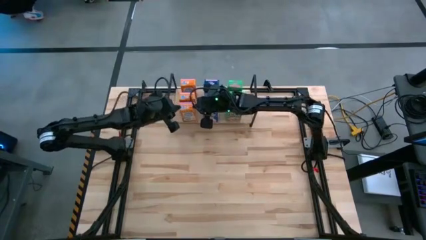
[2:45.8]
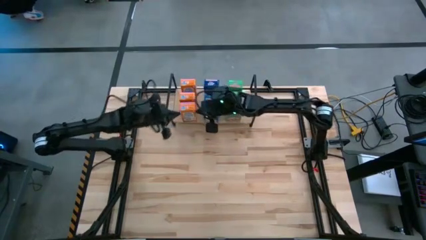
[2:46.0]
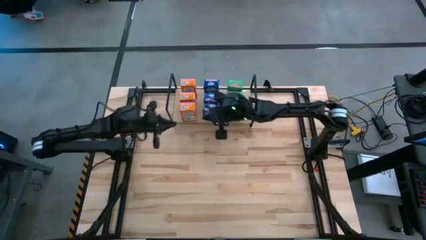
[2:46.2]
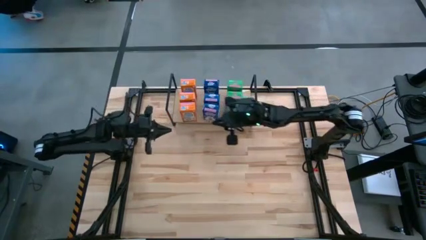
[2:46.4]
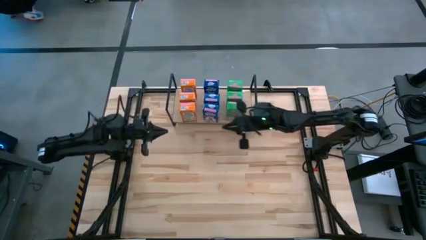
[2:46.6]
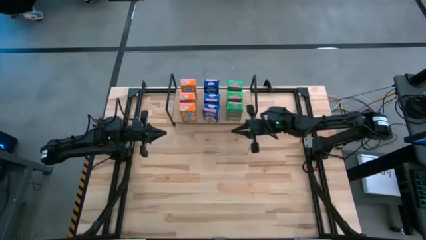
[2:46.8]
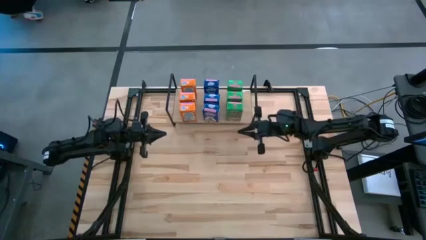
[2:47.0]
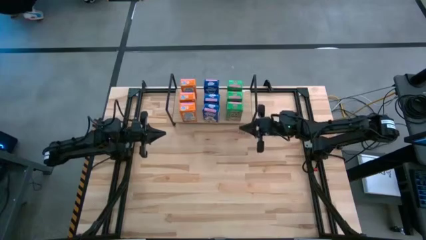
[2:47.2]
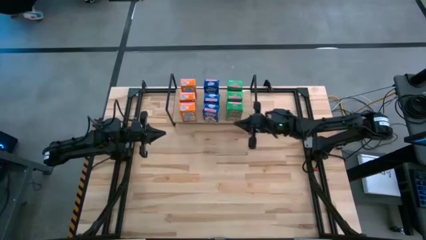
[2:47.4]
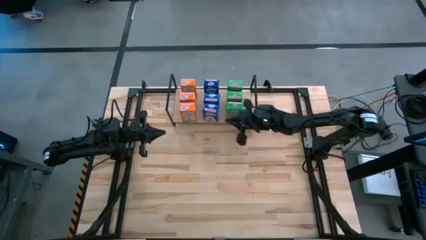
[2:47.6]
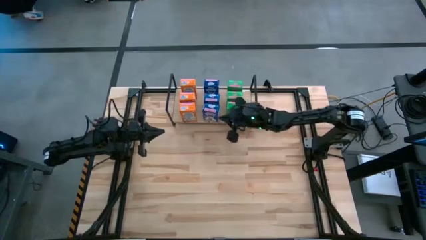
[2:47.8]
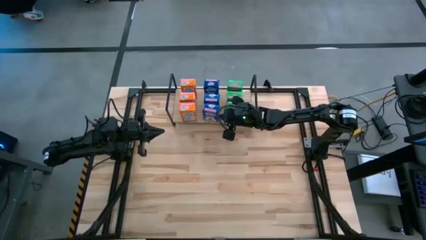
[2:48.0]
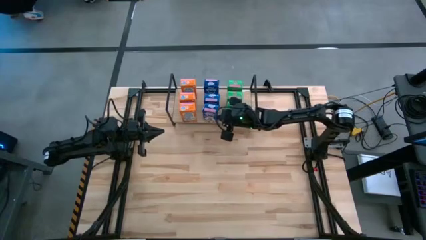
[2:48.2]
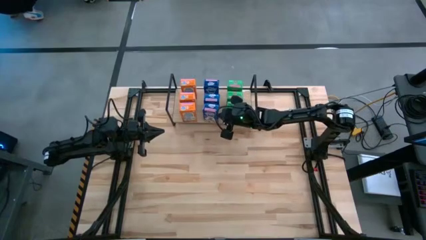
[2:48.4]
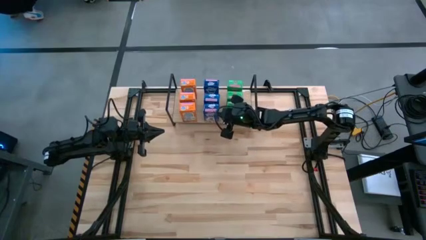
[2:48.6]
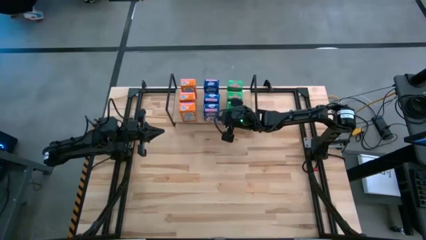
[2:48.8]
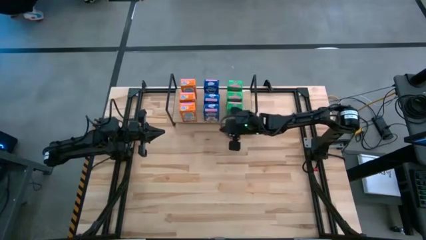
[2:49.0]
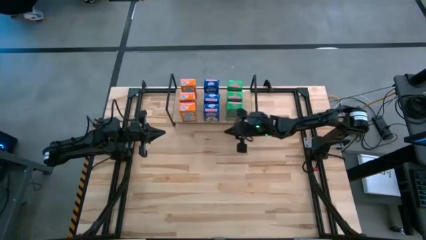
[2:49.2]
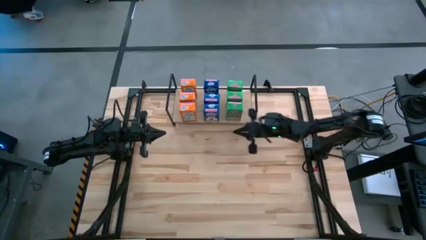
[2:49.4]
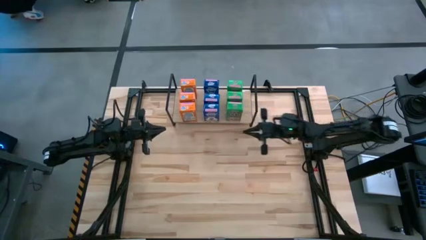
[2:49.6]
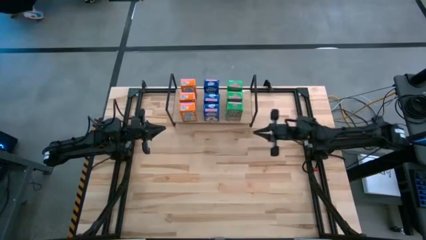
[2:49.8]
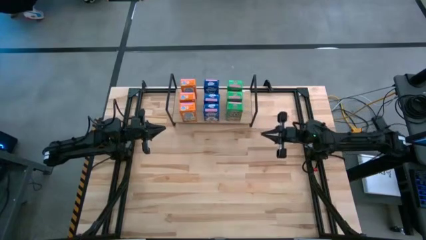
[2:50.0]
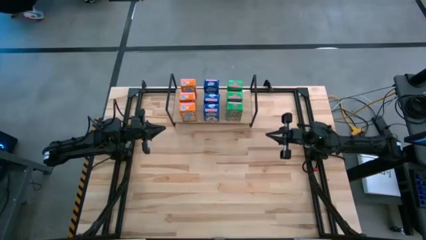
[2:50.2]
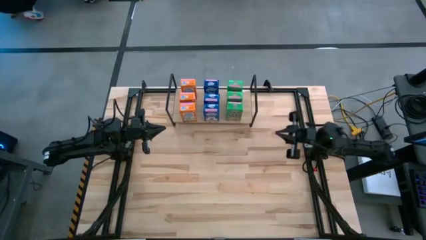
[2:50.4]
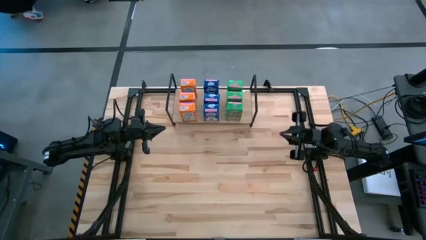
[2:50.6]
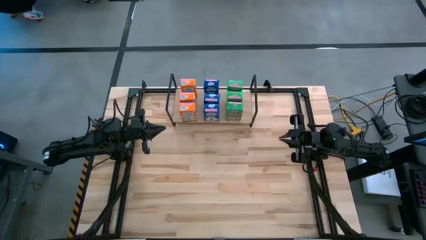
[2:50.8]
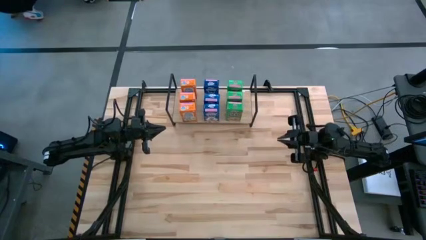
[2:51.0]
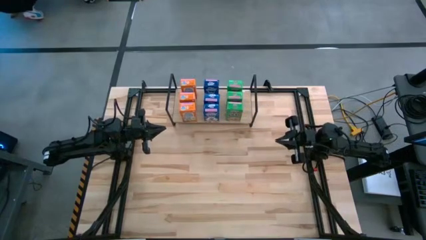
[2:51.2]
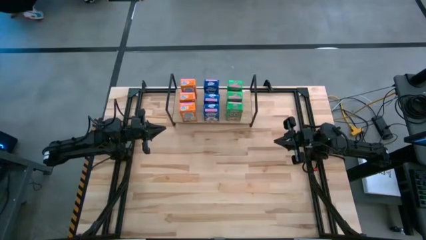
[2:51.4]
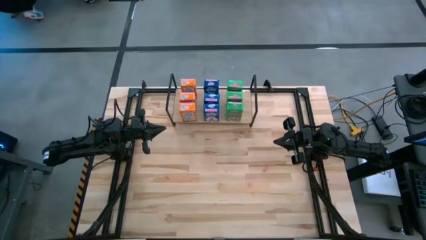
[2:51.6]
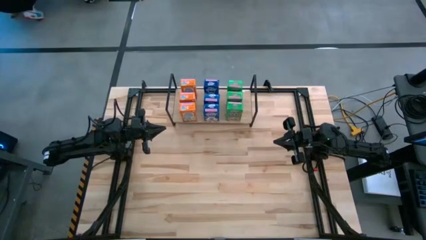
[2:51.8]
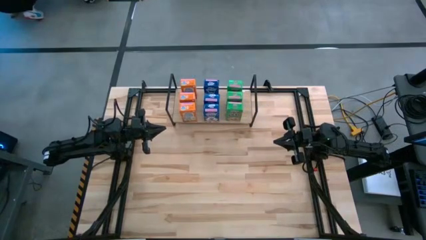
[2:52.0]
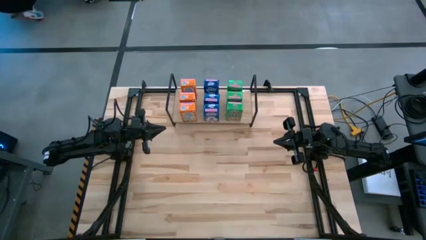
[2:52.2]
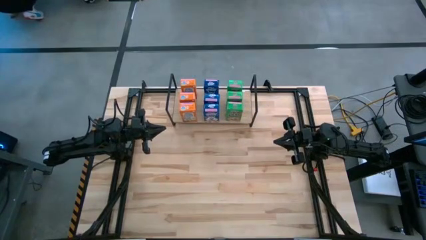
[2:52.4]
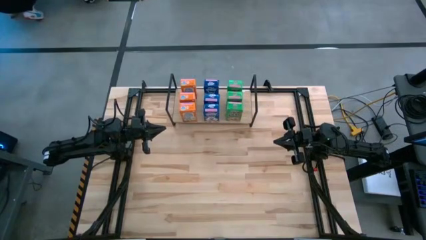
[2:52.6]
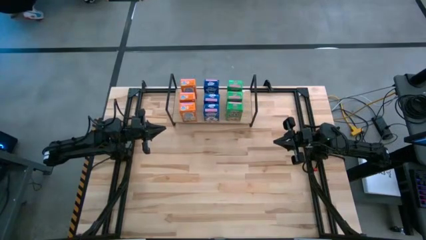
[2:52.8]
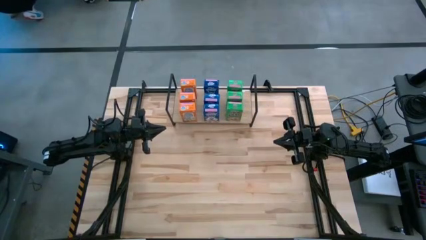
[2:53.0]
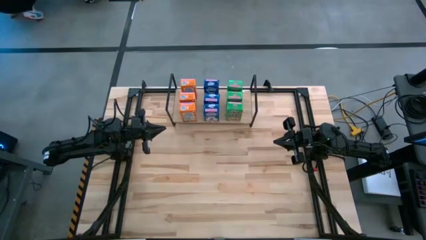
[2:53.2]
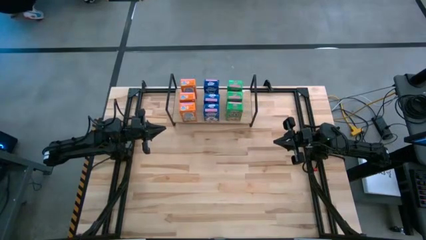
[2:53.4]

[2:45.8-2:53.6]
Task: Stack cereal on shelf
Return to Home Position

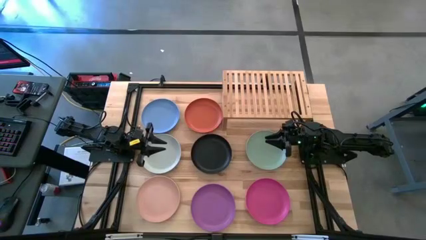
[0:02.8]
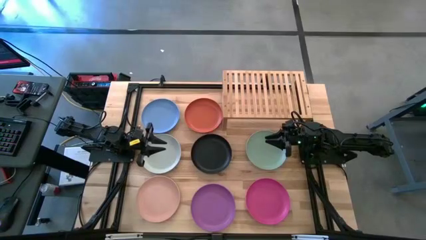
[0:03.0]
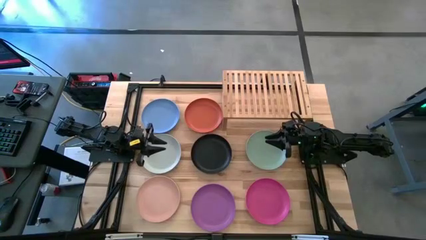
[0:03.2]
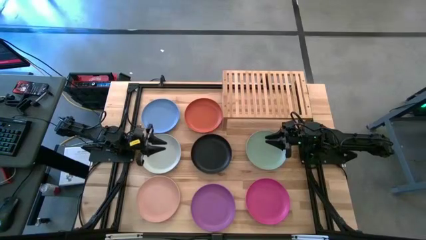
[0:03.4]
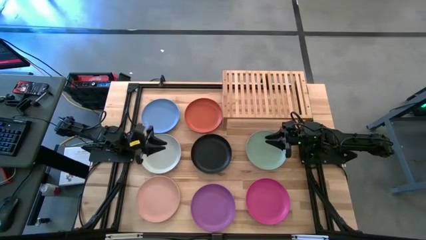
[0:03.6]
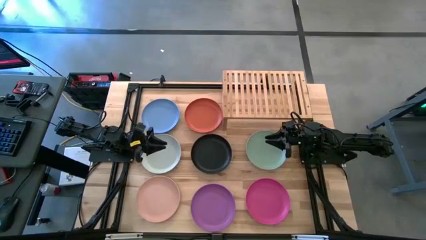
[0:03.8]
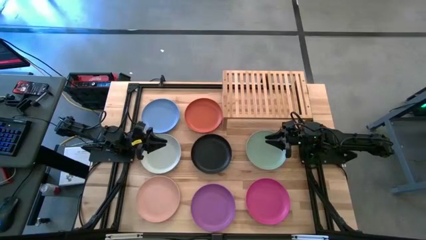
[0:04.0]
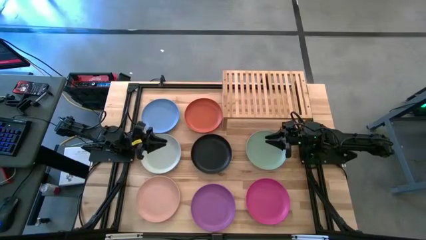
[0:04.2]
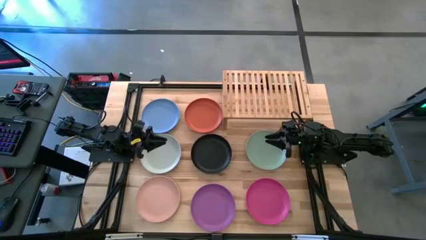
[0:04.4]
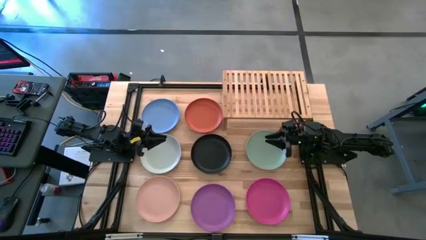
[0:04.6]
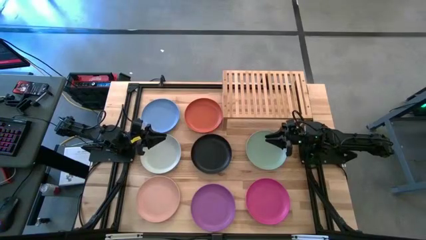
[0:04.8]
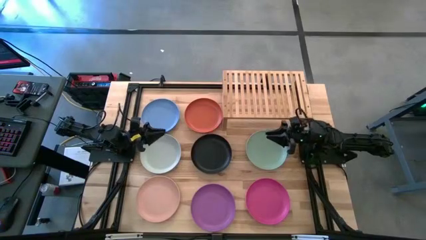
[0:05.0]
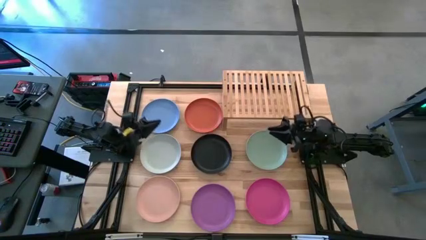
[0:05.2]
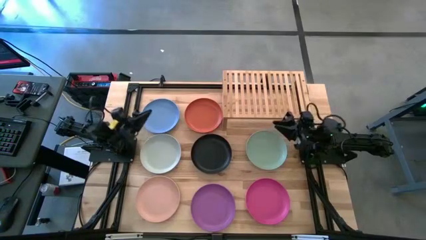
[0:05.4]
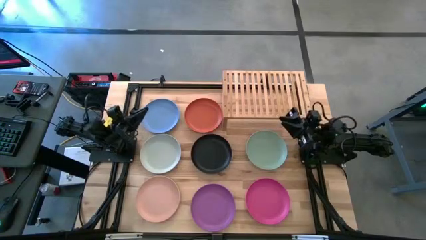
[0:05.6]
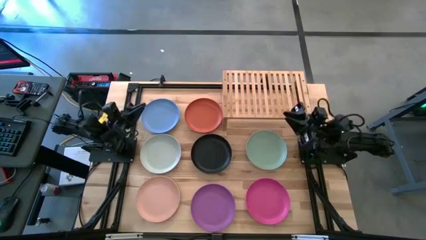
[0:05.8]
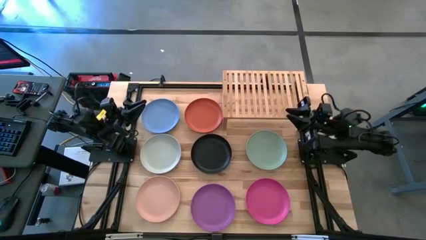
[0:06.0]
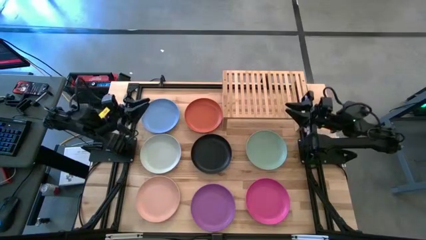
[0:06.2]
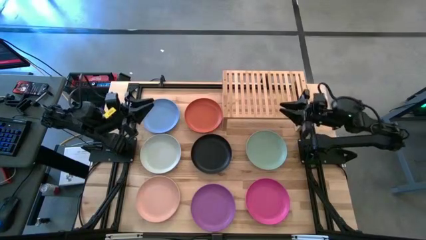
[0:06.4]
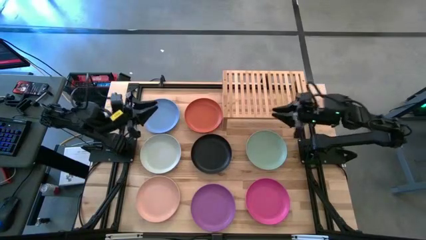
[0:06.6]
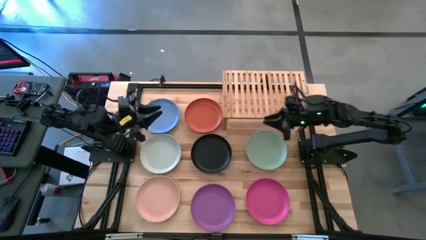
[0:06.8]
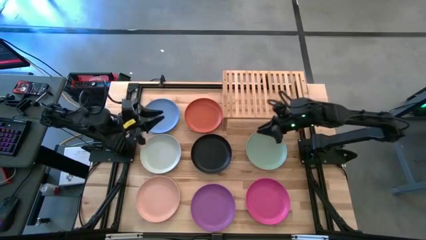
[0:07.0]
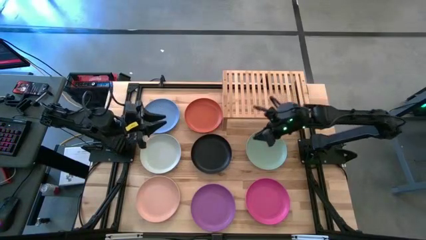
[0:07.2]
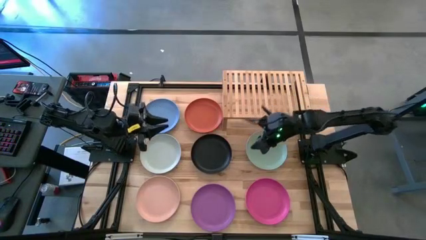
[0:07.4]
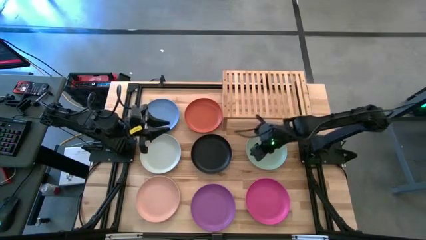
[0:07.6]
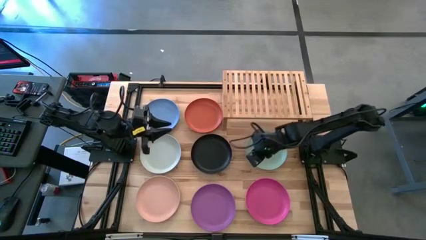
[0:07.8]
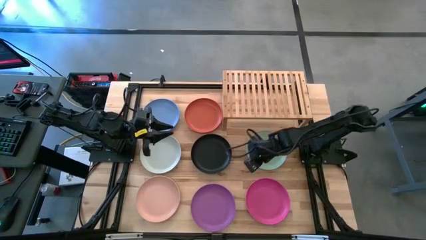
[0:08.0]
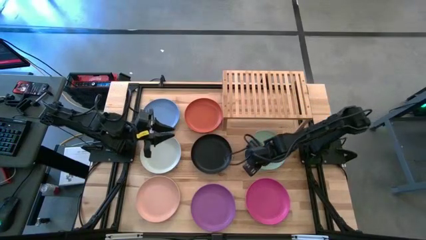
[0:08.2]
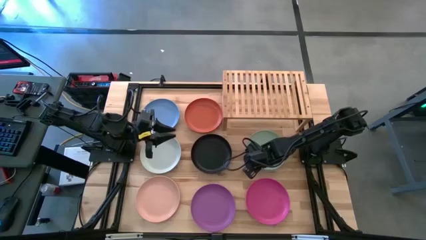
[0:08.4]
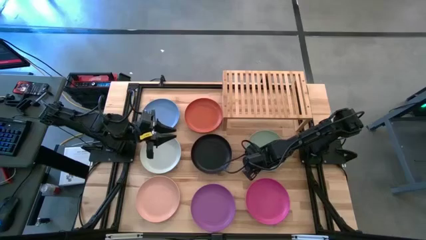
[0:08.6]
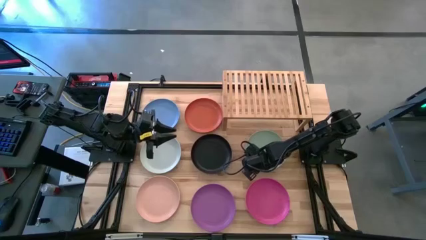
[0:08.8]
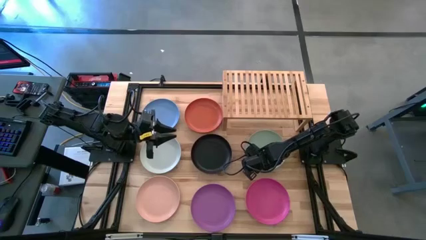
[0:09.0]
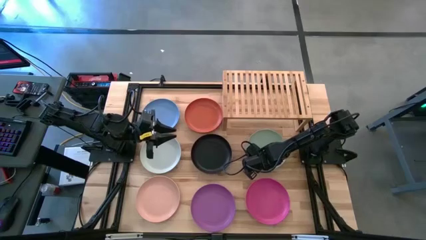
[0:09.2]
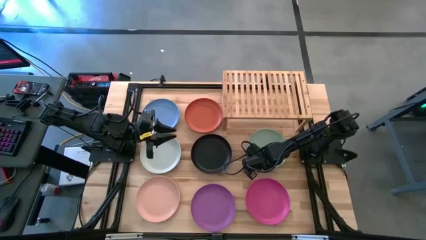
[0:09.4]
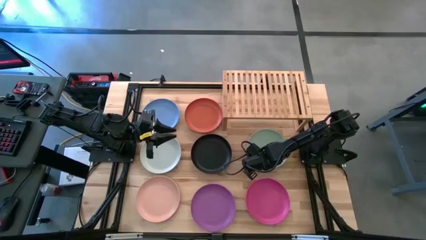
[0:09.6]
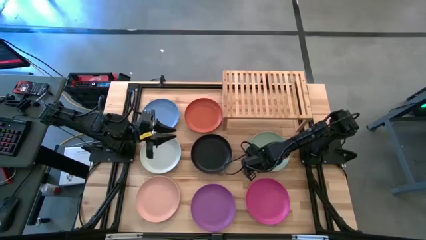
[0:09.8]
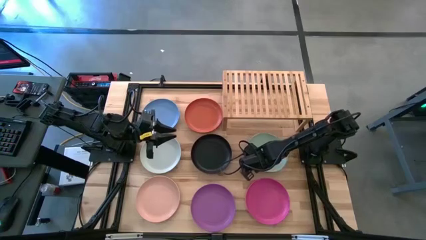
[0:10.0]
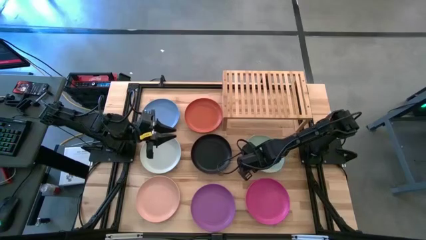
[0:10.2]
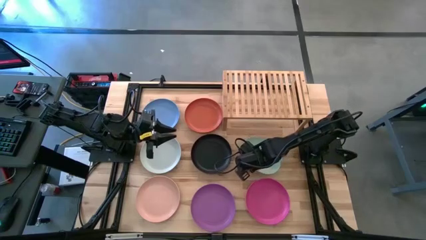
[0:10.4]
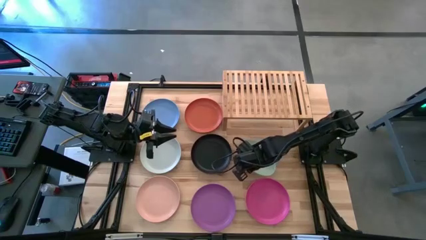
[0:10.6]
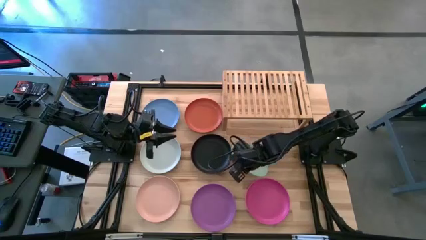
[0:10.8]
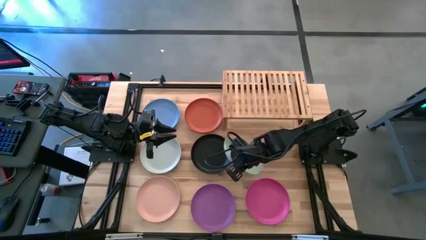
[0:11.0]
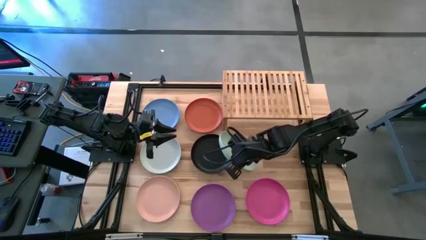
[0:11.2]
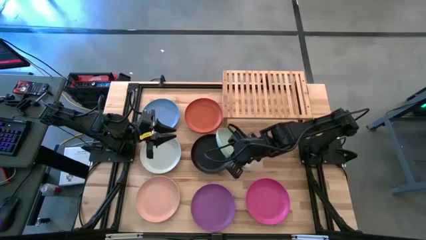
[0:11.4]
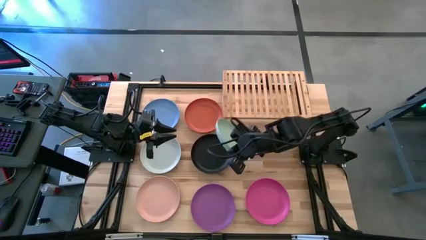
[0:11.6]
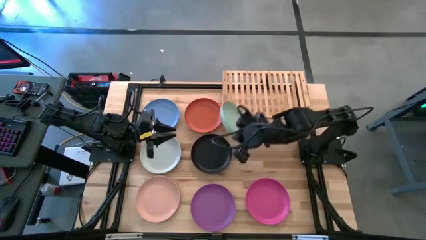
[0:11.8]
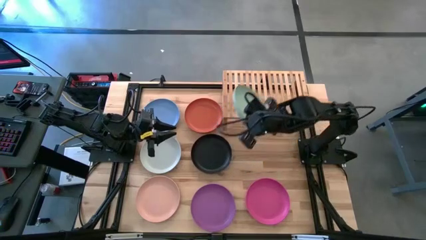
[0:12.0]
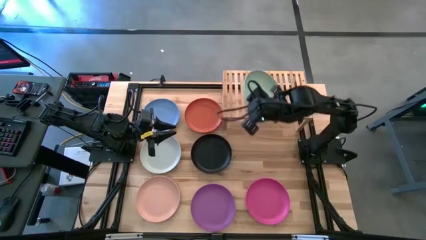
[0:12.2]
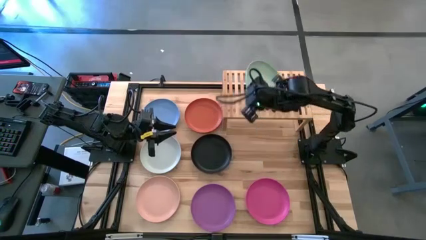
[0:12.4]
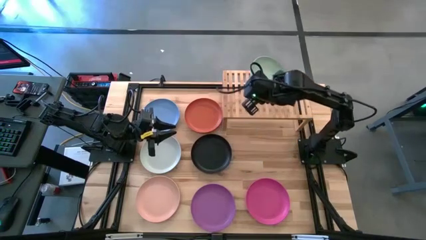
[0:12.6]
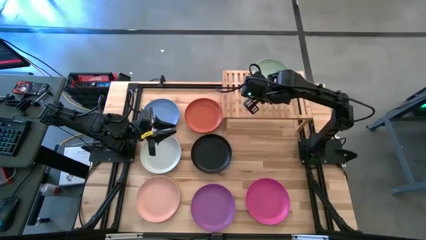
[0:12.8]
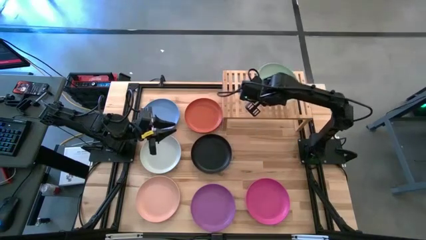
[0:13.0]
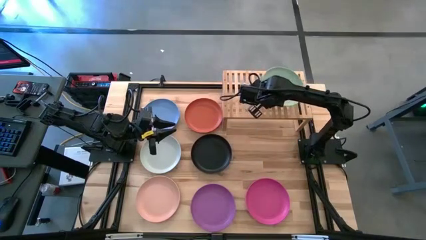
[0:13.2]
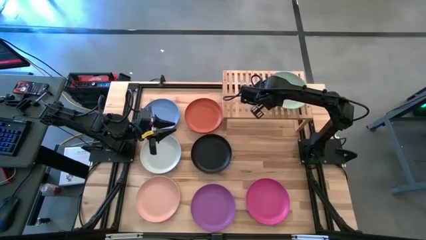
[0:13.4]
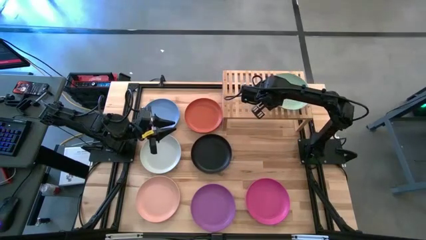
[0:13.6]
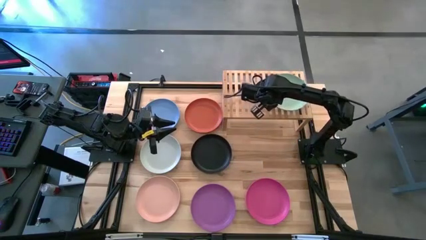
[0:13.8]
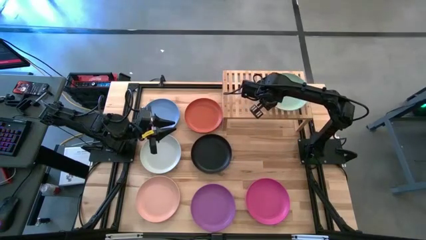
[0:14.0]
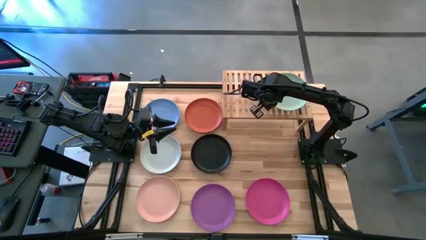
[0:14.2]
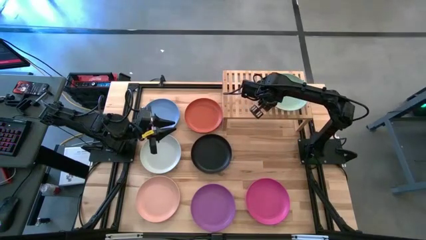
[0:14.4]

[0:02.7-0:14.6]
Task: Place and stack plates onto a shelf
Put the green plate on the shelf
